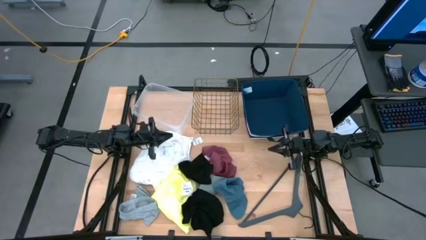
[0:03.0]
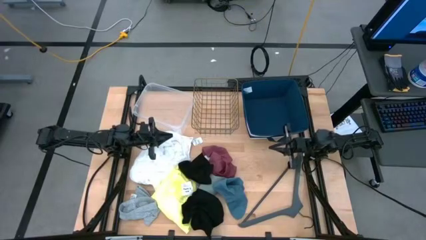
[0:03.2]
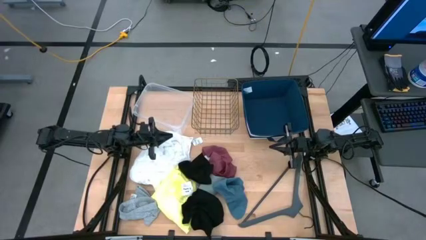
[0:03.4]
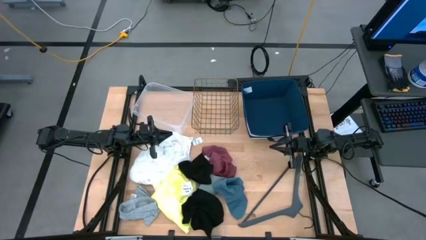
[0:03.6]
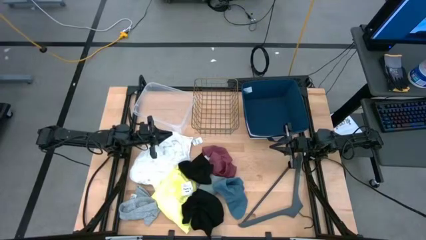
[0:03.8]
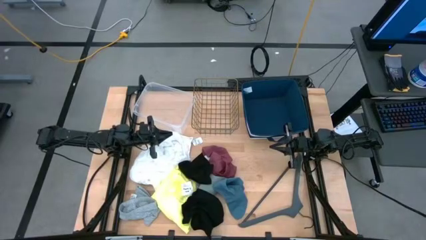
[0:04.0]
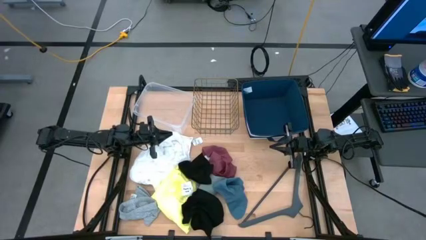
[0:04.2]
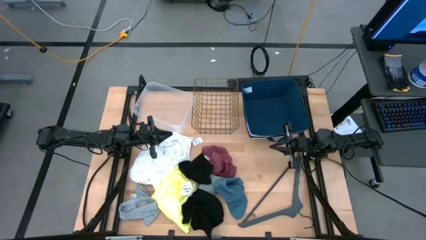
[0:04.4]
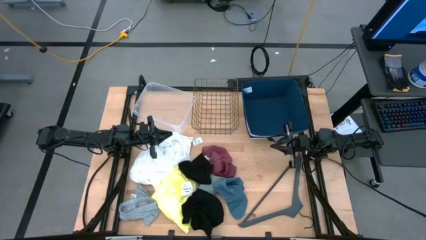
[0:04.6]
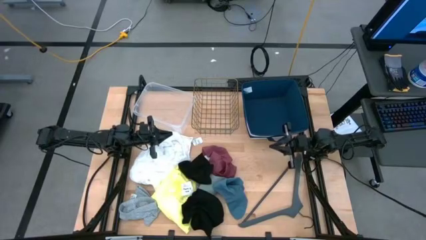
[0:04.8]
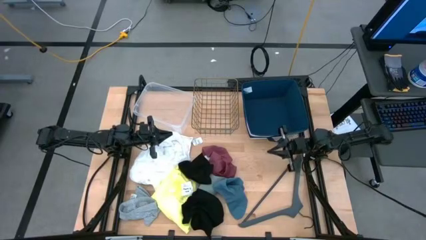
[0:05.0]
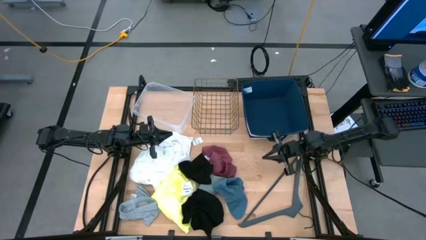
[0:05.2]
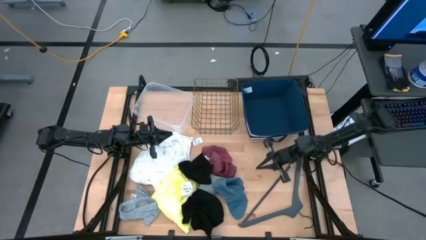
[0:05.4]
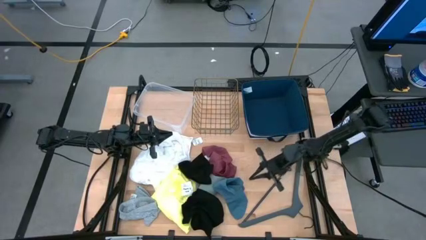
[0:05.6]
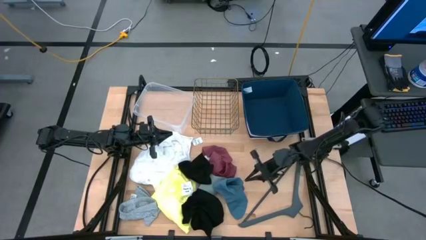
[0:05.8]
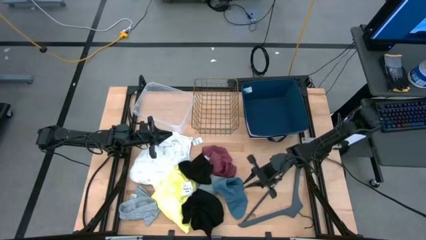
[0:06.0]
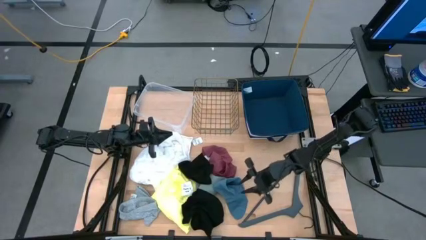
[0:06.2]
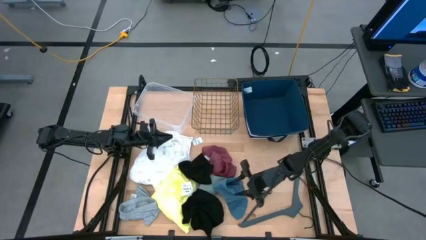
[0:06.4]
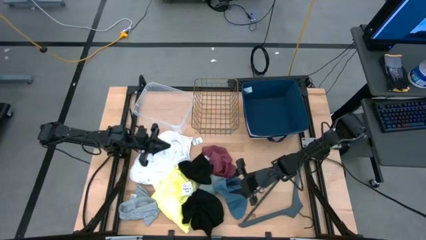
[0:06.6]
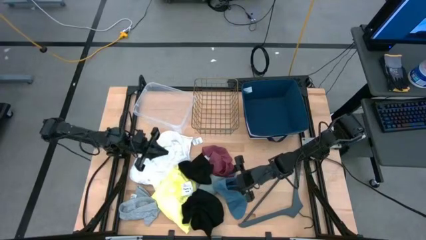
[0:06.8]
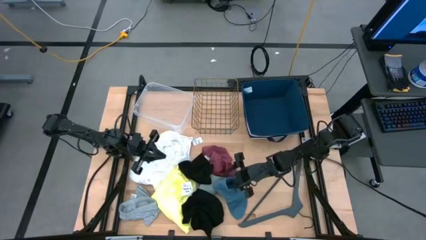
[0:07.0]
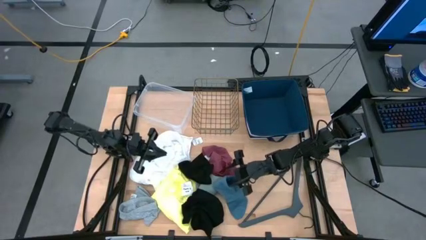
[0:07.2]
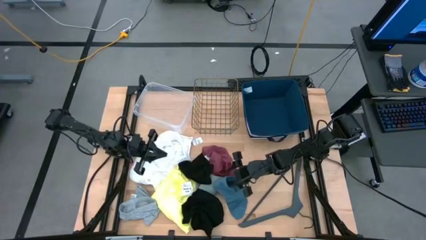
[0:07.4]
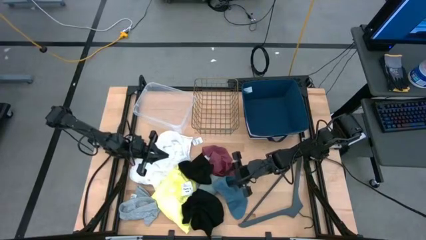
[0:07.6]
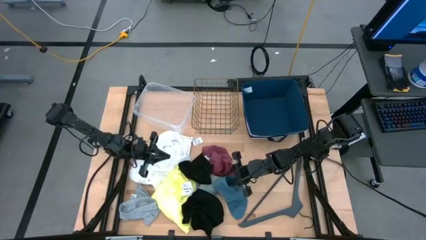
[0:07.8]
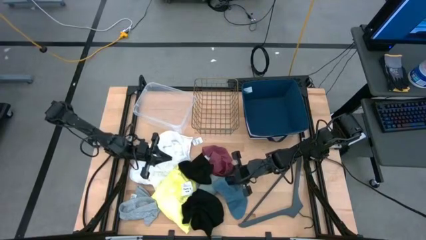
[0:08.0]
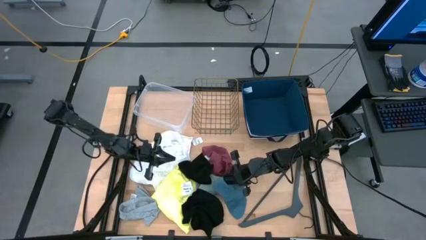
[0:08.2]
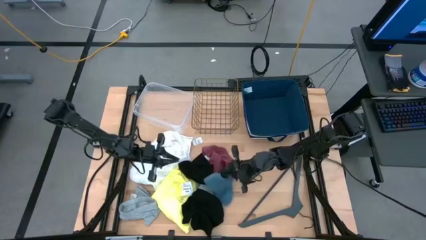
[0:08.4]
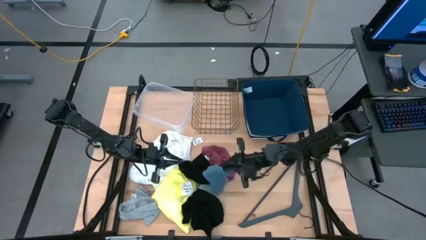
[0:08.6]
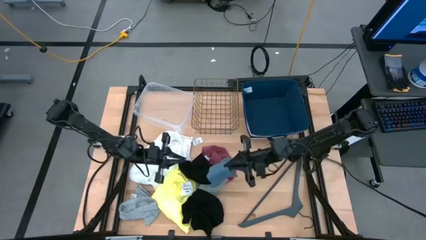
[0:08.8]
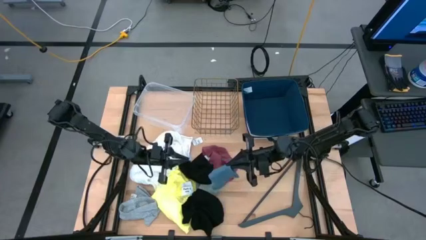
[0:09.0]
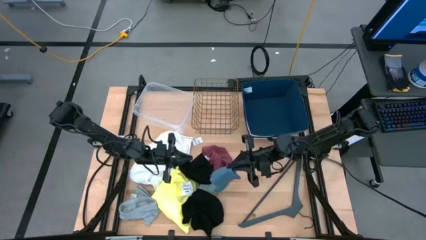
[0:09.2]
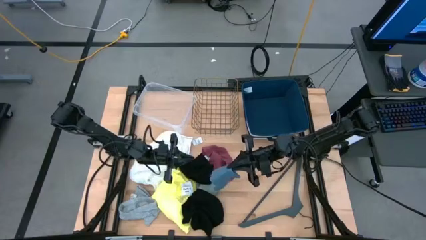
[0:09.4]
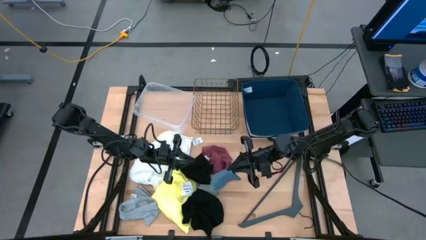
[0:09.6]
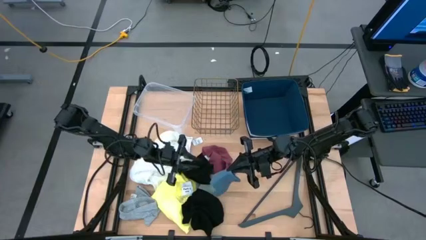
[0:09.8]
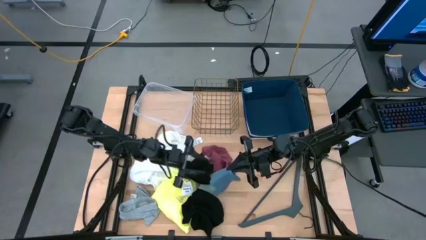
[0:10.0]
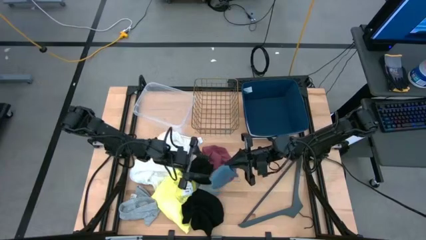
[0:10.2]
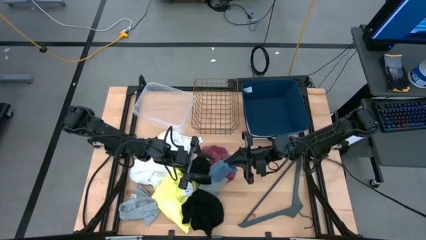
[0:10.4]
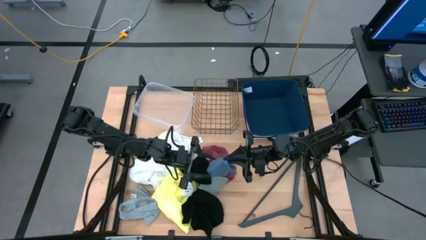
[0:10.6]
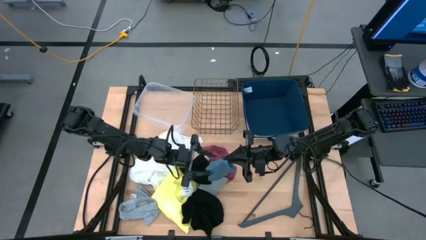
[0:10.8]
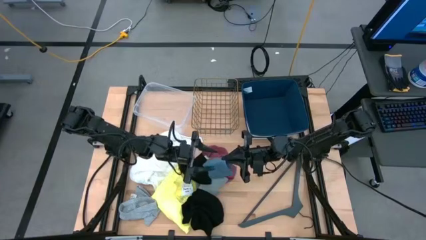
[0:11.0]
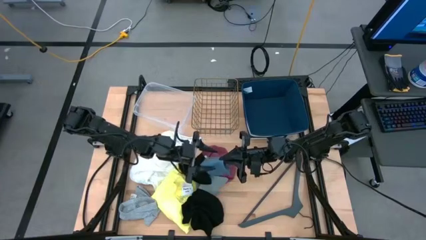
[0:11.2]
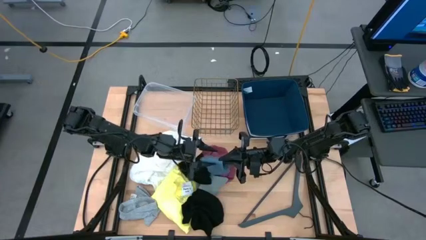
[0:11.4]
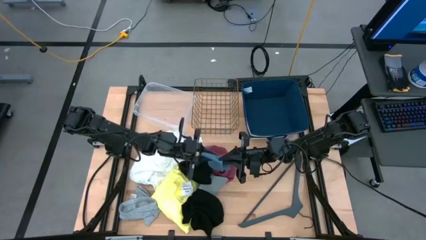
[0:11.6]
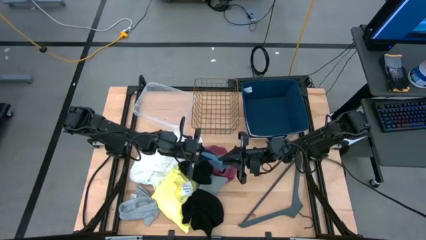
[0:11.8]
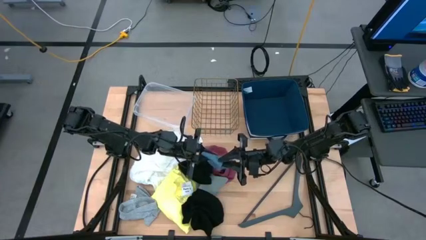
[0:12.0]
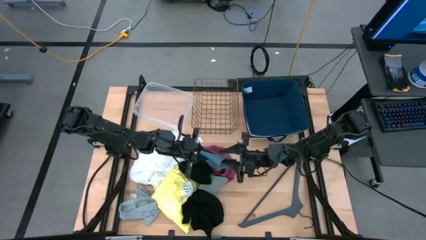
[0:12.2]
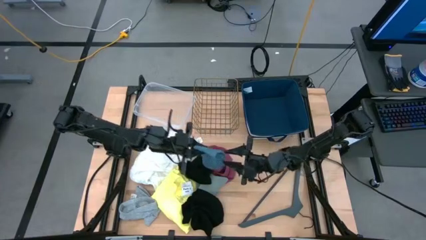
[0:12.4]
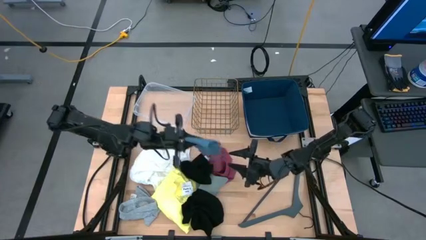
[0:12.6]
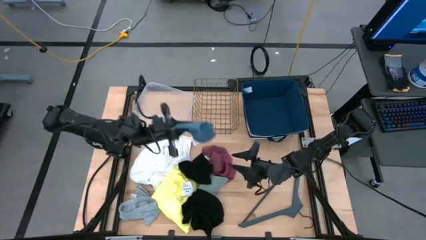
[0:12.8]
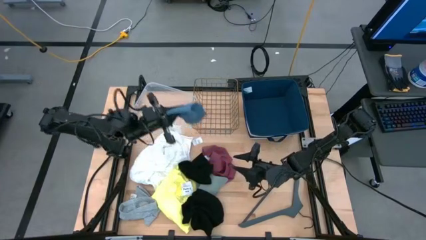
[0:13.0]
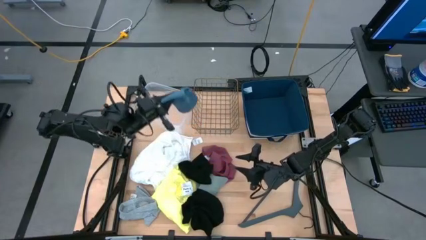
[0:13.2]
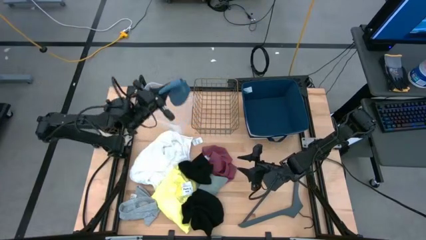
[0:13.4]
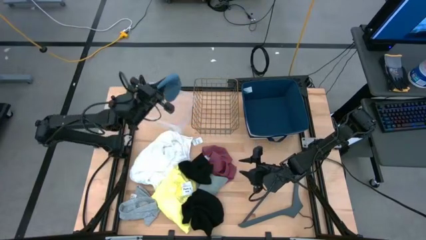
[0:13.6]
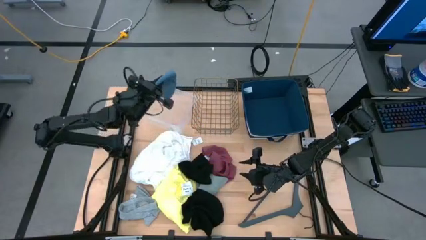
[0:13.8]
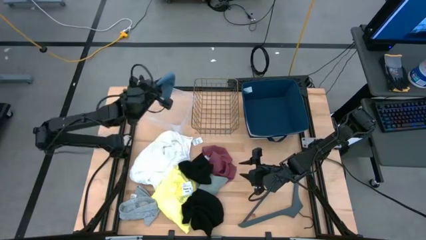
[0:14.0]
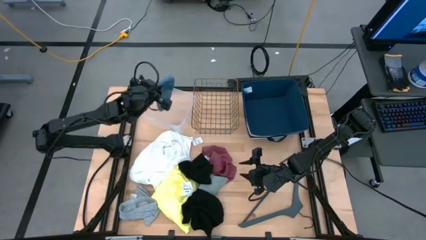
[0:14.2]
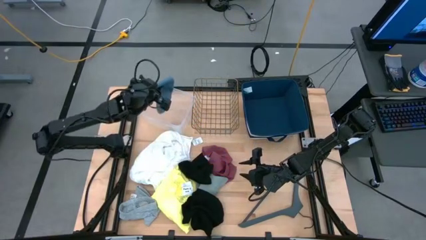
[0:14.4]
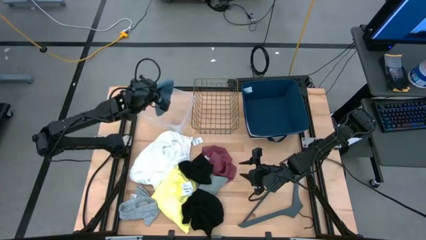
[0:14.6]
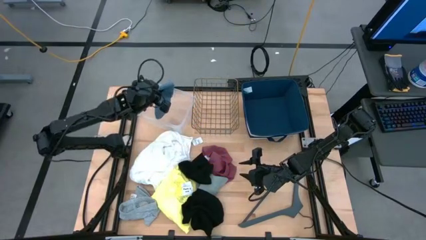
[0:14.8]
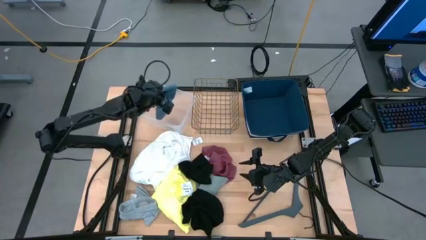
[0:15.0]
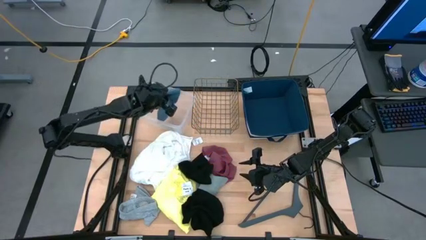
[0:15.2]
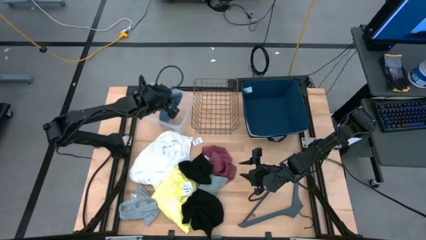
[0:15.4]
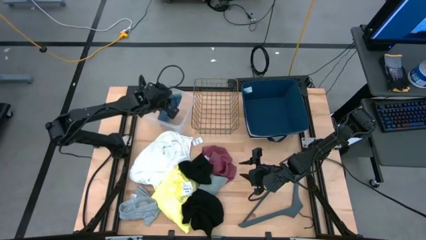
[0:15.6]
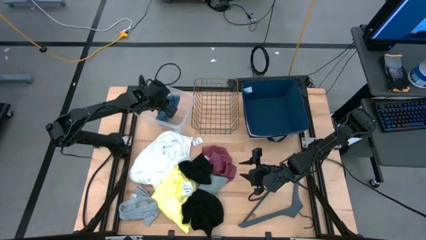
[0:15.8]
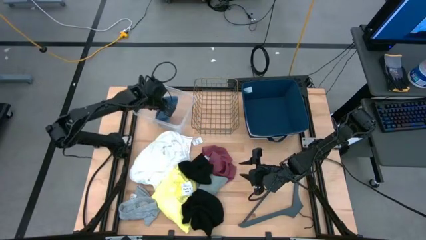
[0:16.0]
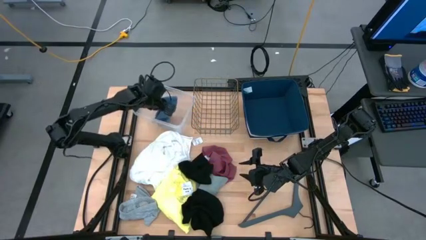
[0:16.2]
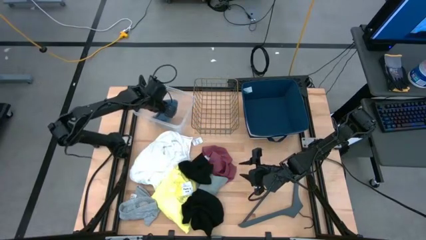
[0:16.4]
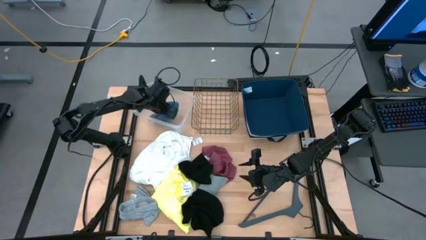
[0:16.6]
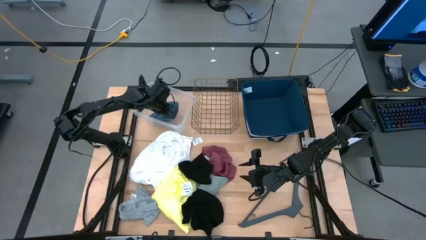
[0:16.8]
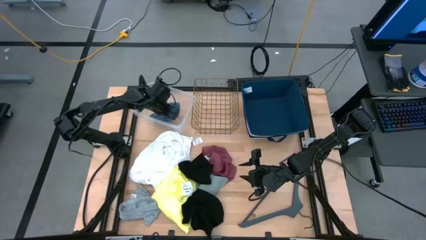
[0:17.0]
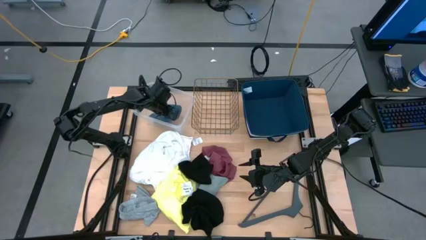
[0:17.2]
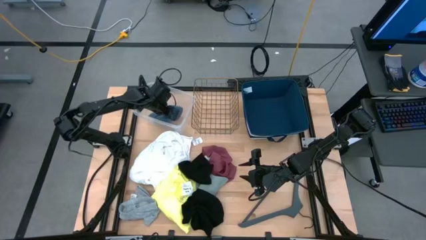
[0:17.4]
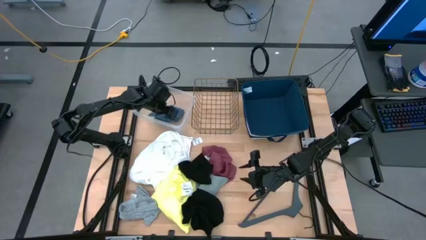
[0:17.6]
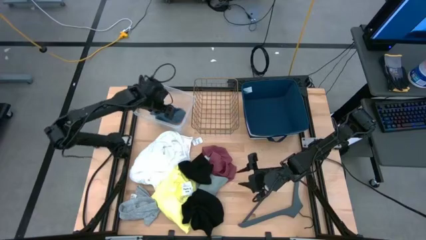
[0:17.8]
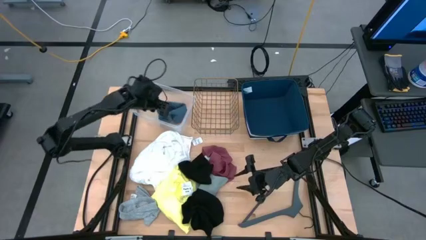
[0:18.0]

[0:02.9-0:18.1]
Task: Pick & Place Cloths
Put the blue sock into the transparent bin
